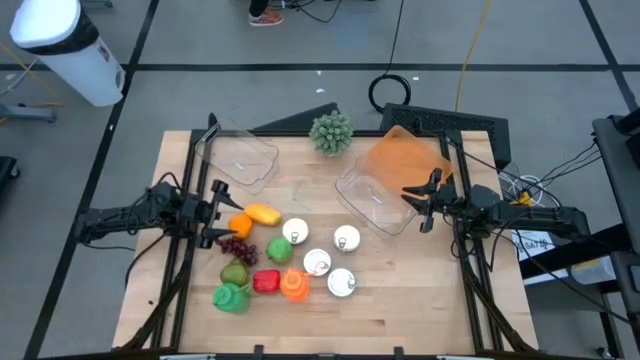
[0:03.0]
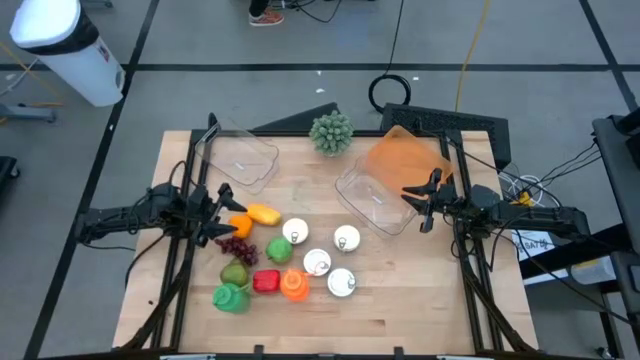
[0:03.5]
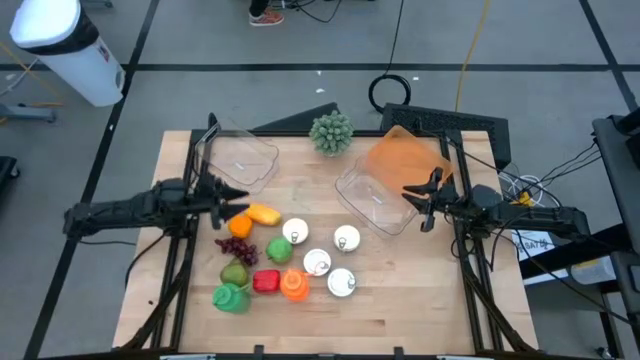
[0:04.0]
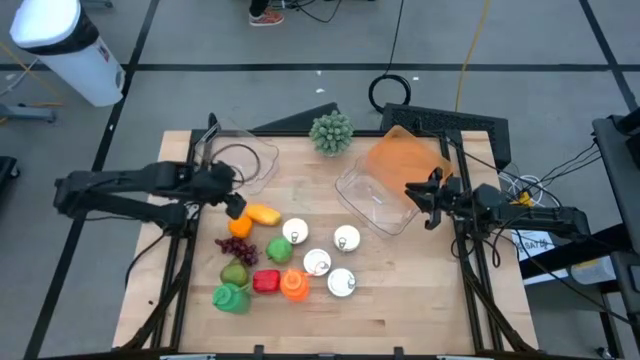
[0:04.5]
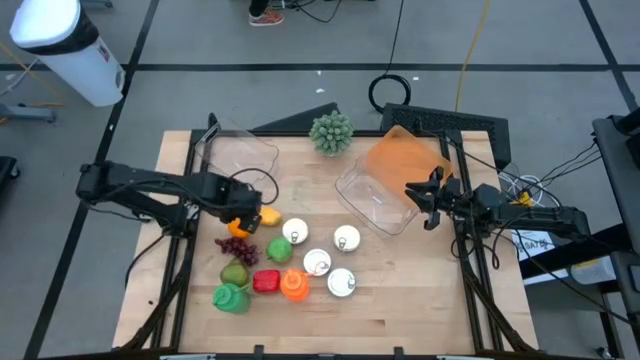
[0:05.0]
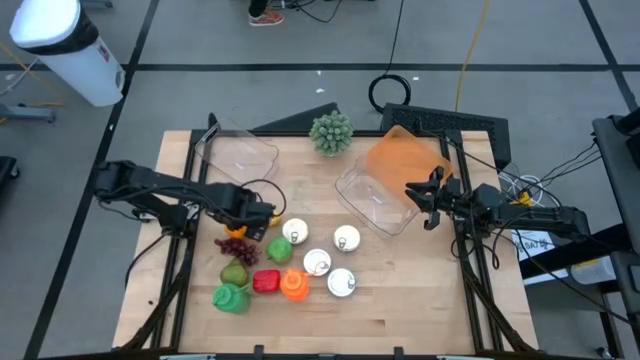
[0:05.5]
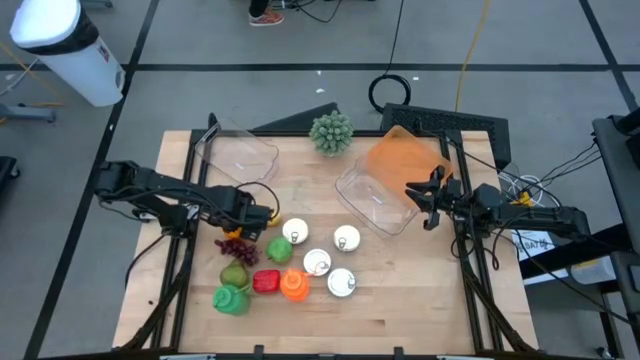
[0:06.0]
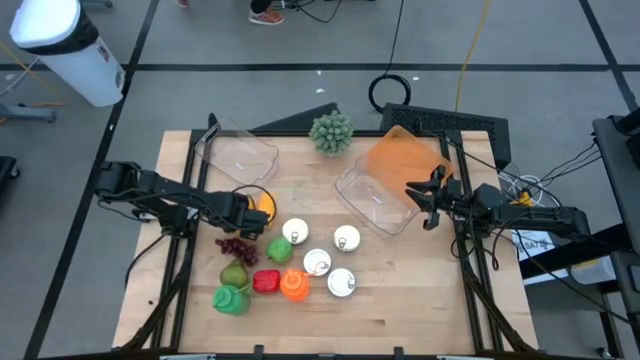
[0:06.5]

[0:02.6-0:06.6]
Task: Pick & Place Food Item
Put the orange into the orange bin

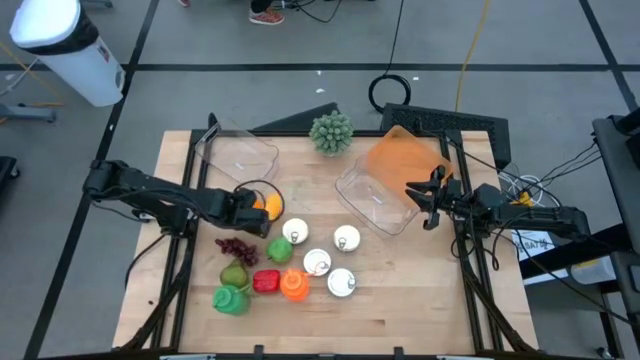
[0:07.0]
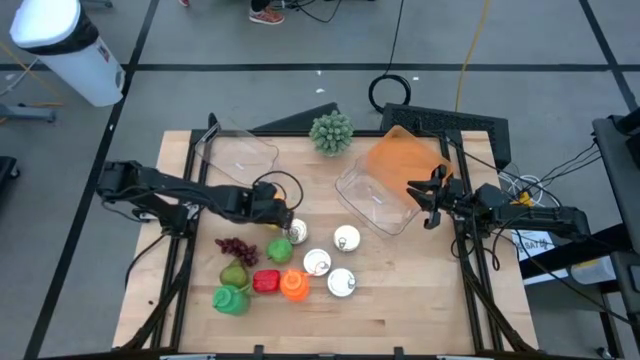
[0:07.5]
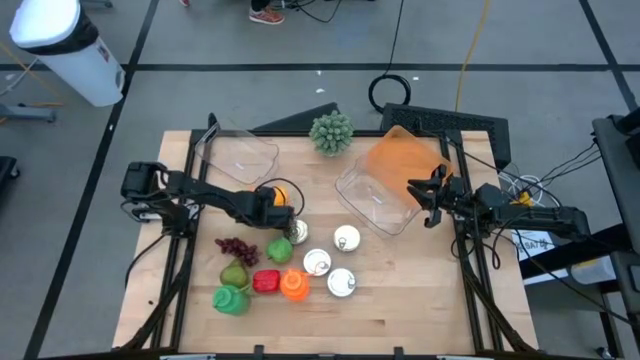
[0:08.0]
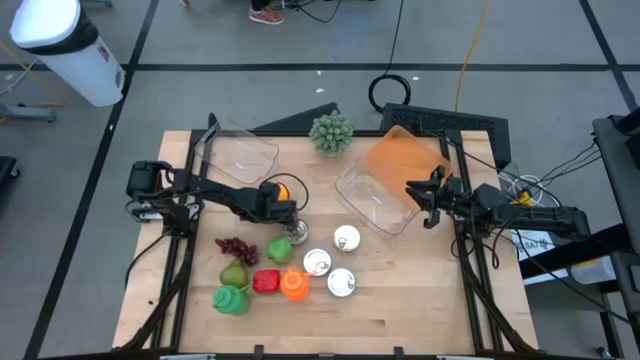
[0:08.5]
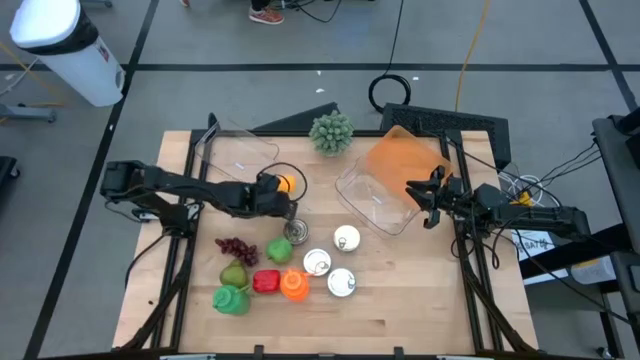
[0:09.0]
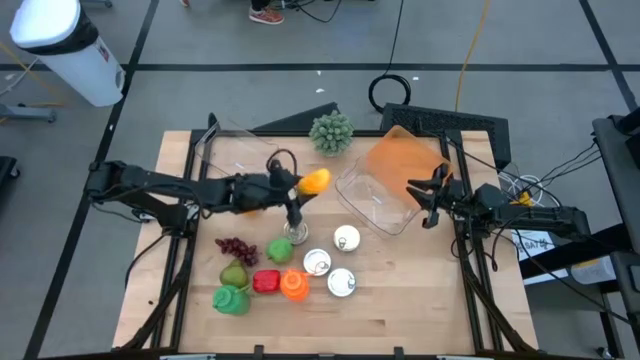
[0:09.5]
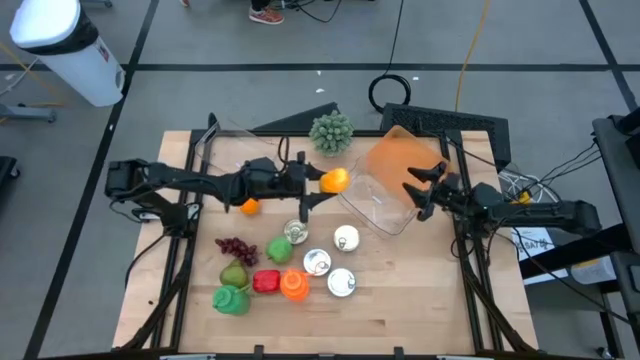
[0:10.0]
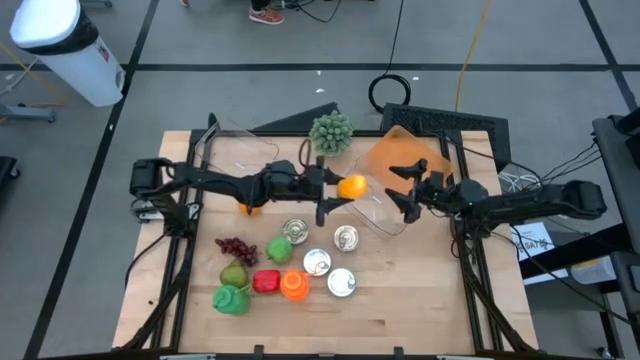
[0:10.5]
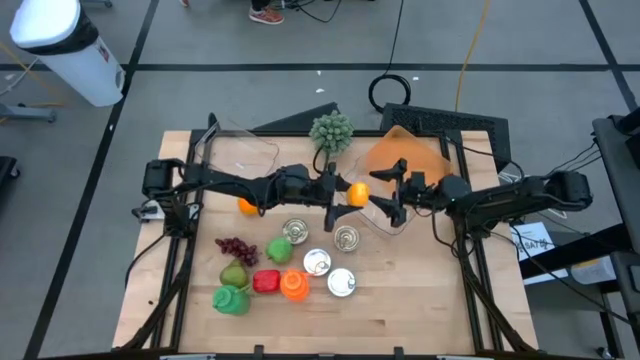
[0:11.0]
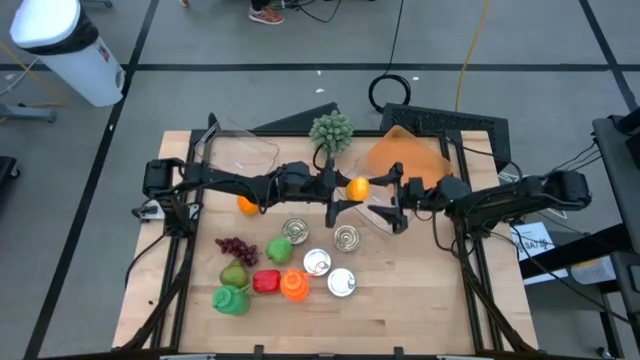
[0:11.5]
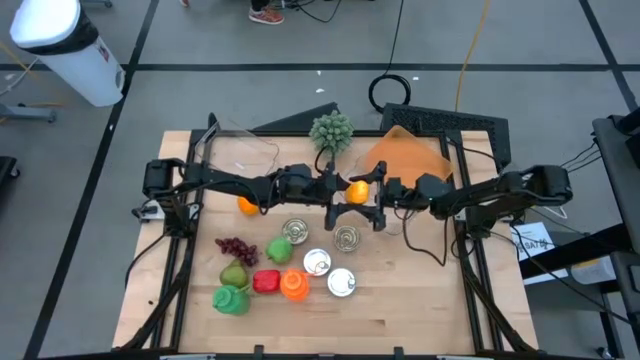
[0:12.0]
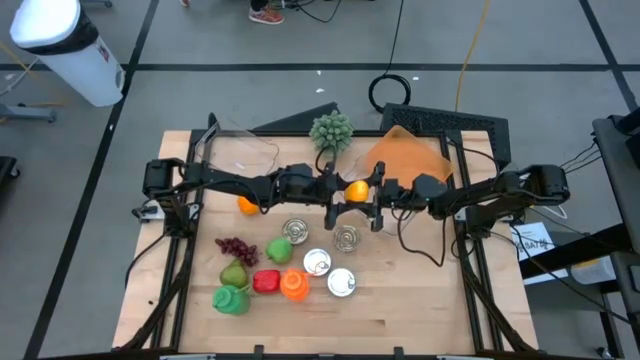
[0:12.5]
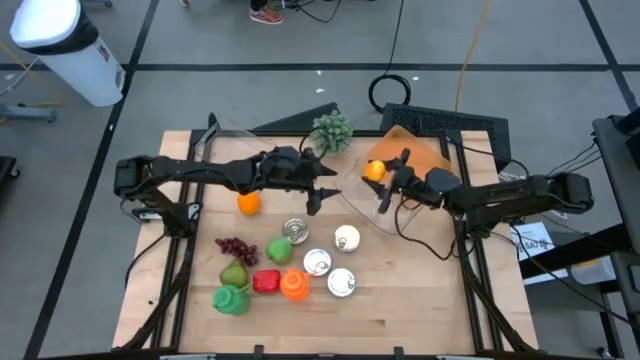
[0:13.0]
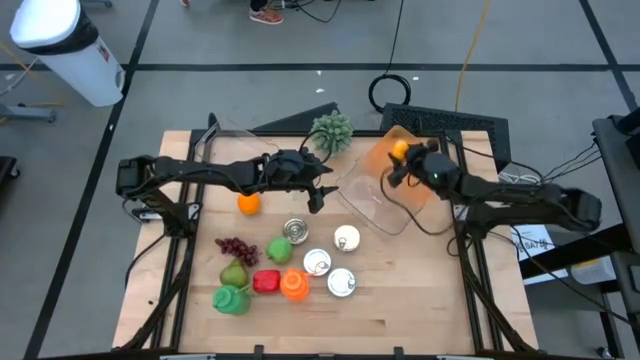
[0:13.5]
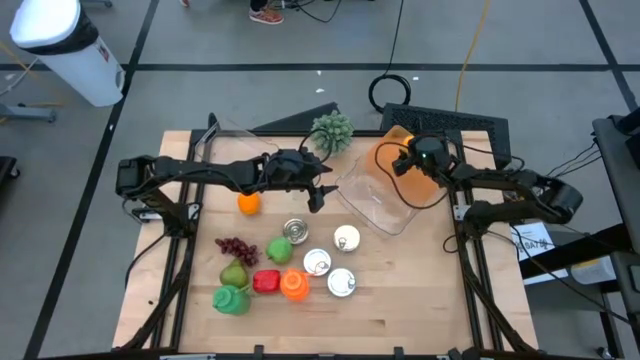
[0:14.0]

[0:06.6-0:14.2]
Put the yellow mango into the orange bin

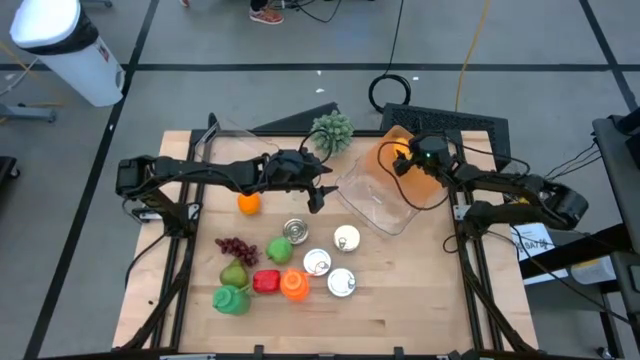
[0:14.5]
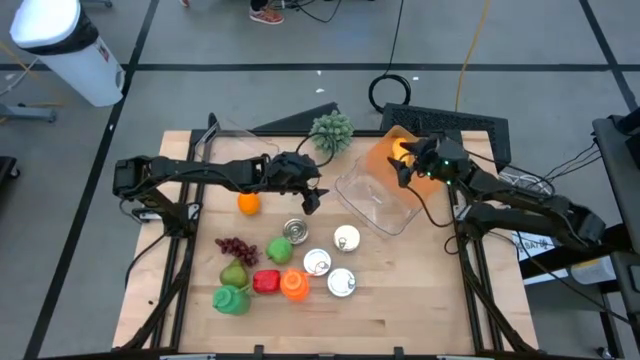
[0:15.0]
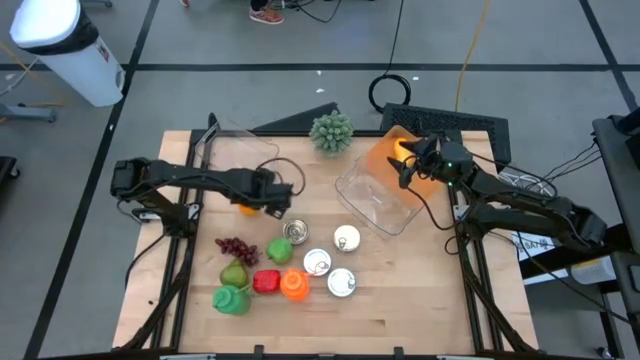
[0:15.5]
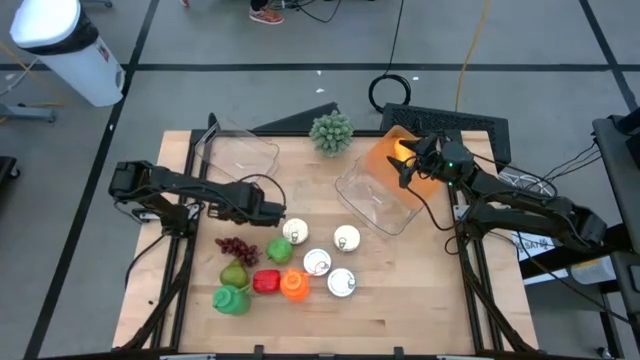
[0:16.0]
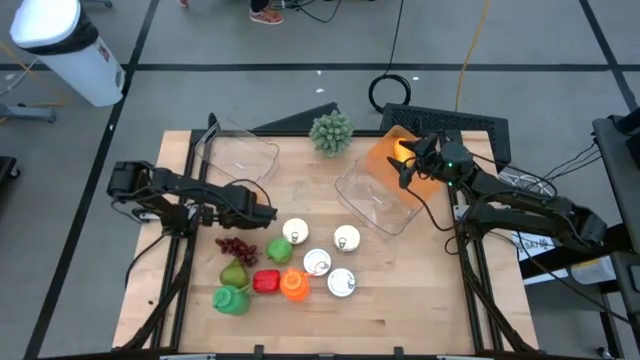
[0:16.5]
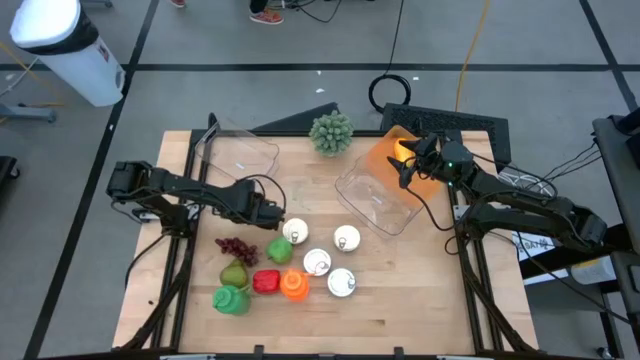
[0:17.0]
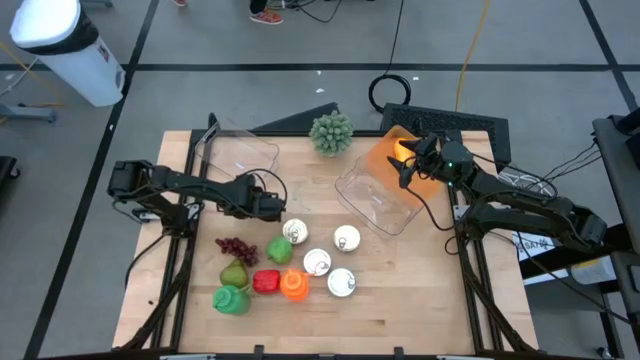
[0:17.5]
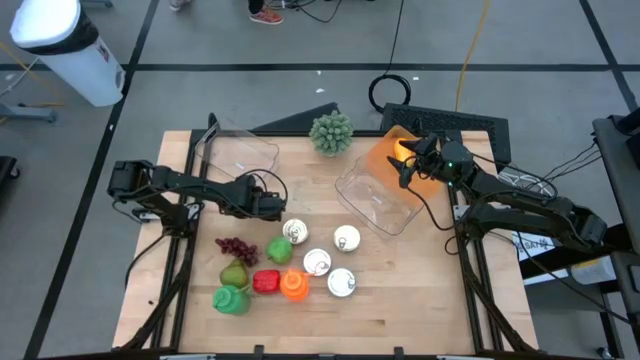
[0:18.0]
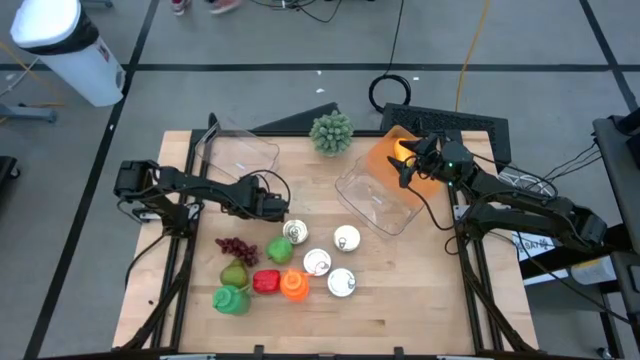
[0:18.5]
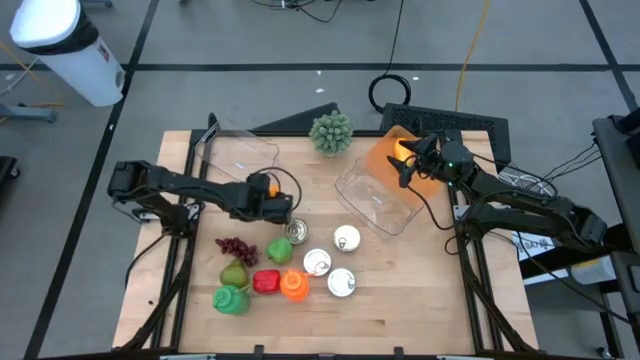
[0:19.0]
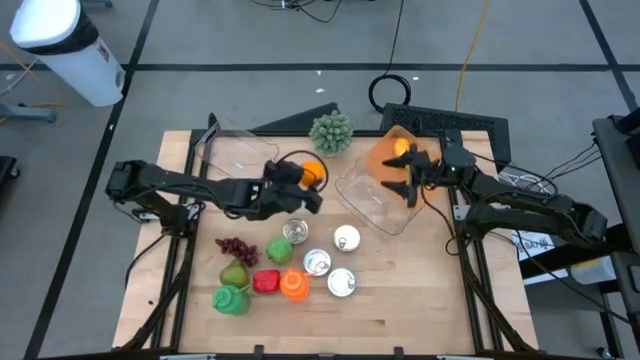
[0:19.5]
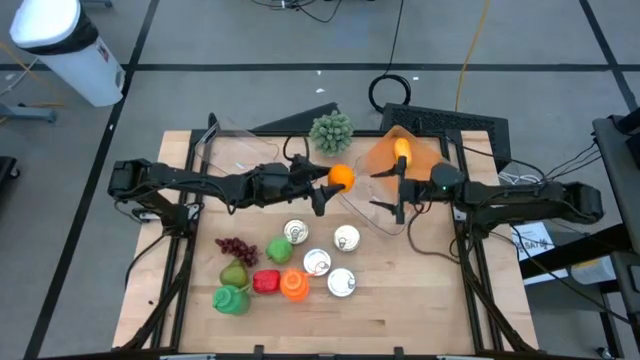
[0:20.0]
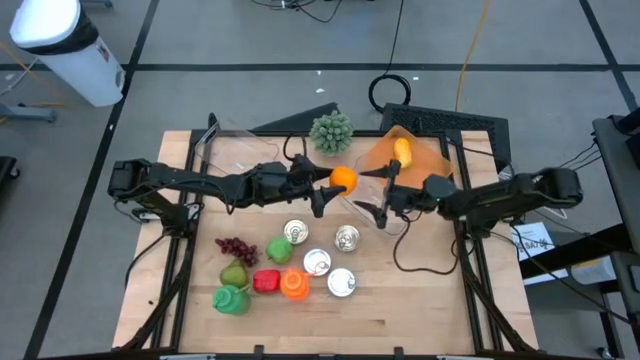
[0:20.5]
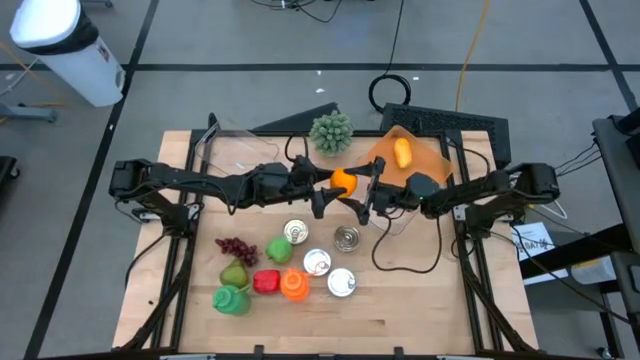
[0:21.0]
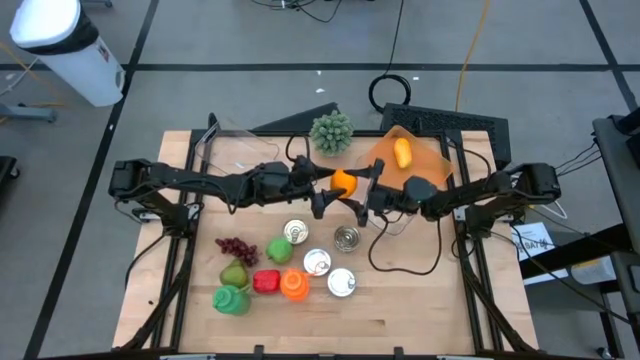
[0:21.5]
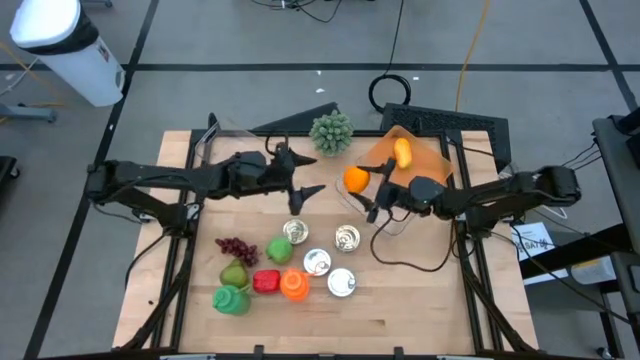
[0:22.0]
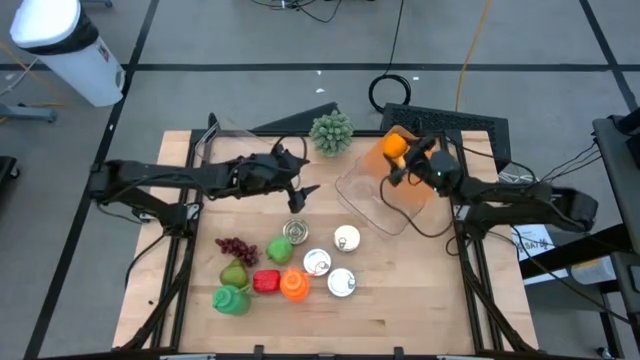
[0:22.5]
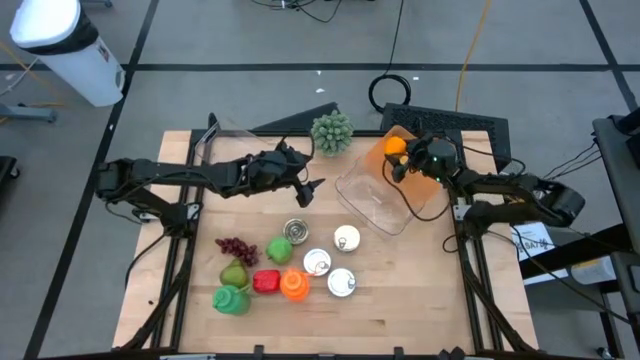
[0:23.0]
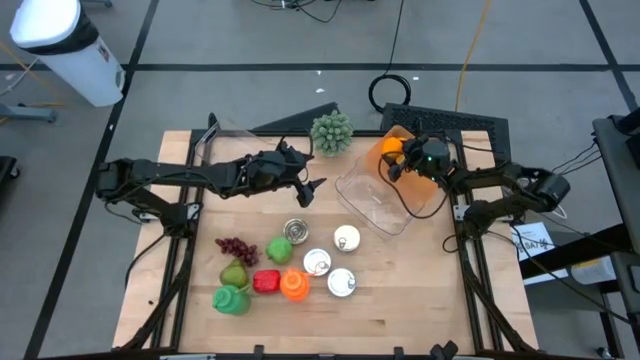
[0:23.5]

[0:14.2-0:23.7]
Put the orange into the orange bin

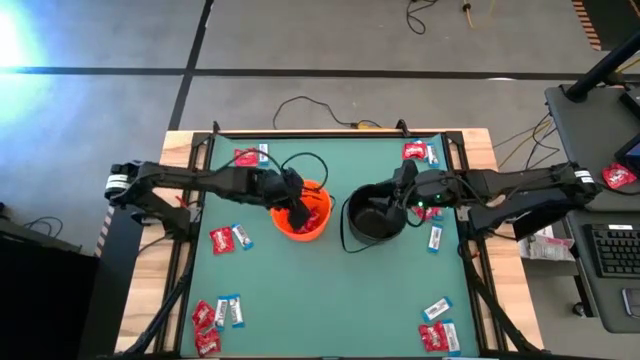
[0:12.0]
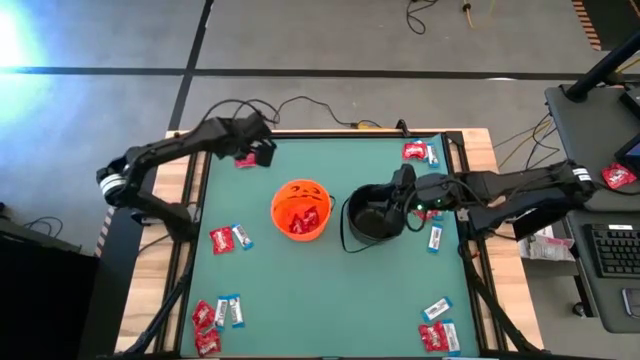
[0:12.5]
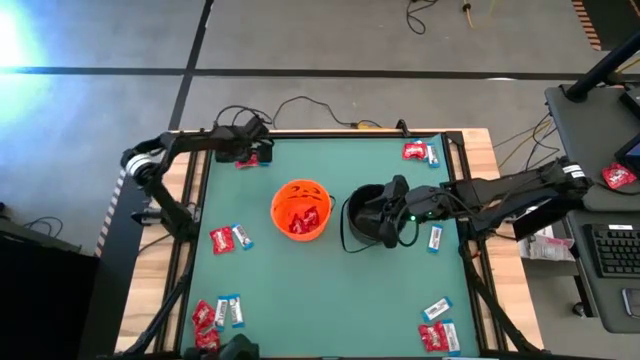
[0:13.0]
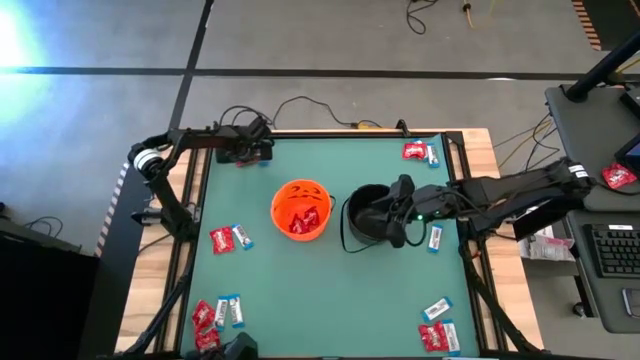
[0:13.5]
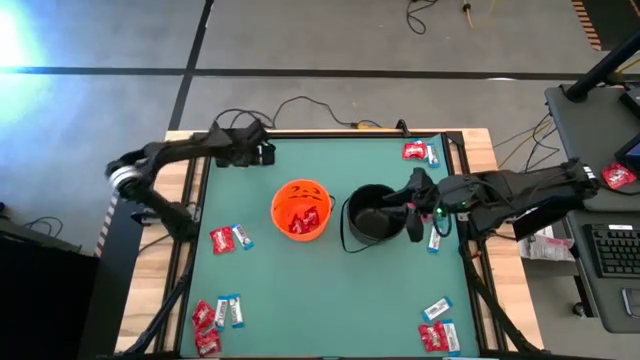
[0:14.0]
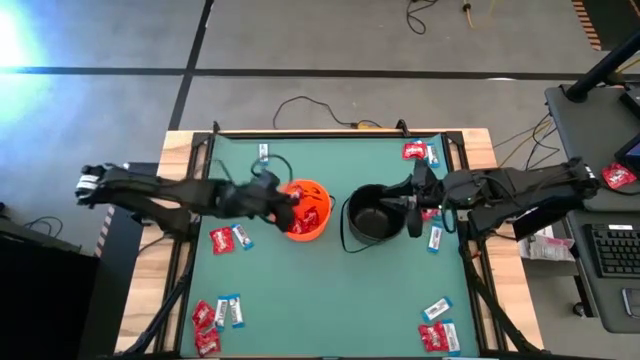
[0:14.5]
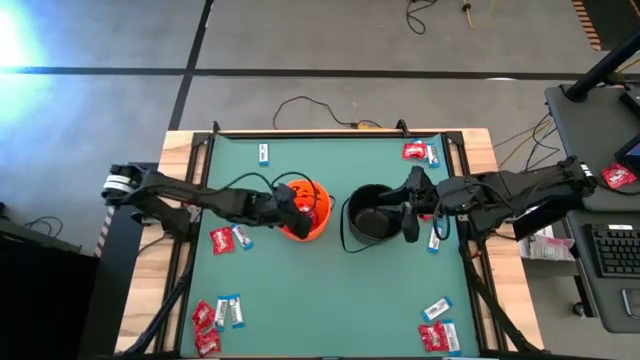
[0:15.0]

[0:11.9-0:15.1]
Task: Sort candy by brand, put in halloween buckets
Put the red candy into the orange bucket
